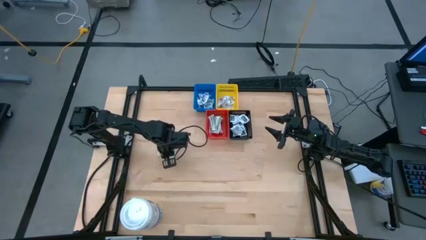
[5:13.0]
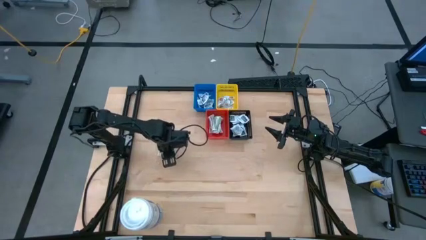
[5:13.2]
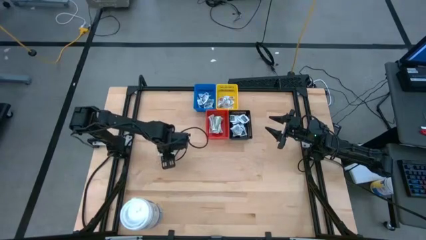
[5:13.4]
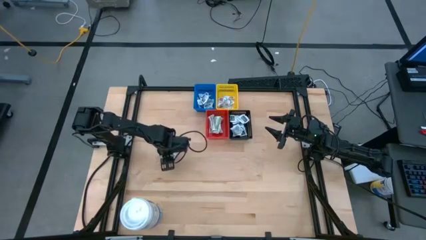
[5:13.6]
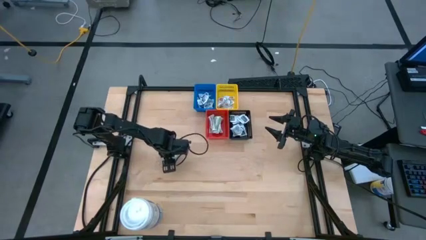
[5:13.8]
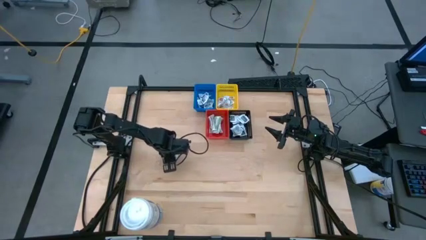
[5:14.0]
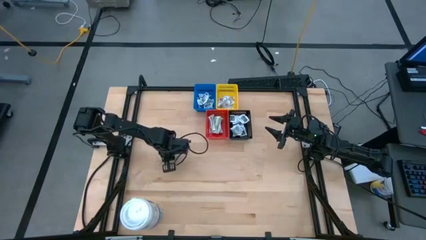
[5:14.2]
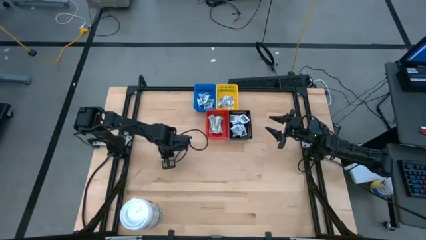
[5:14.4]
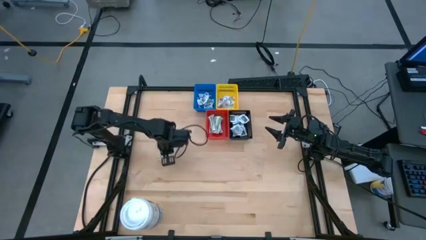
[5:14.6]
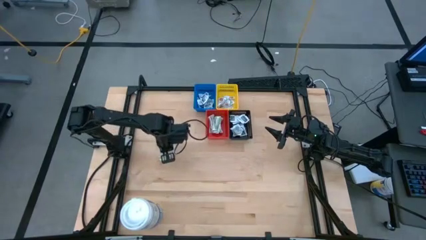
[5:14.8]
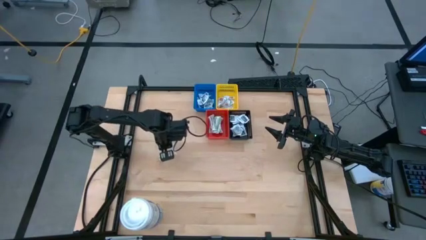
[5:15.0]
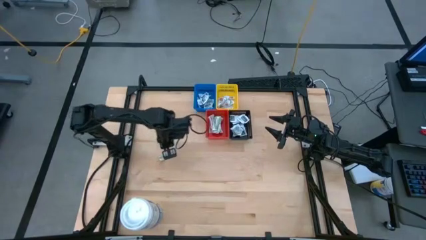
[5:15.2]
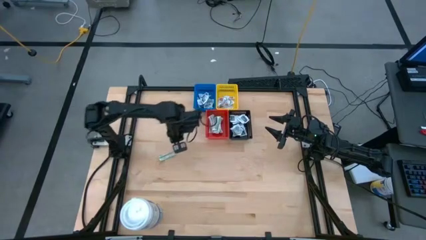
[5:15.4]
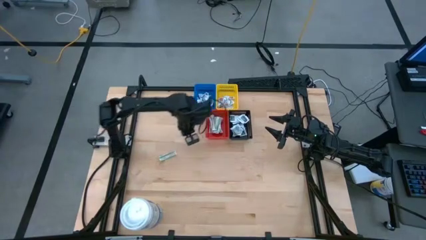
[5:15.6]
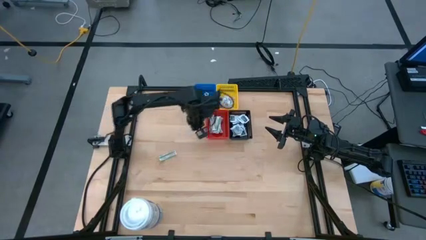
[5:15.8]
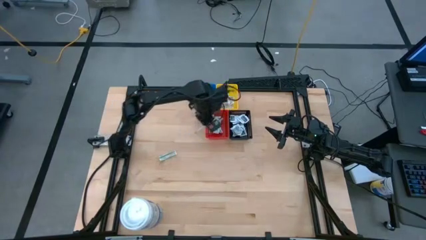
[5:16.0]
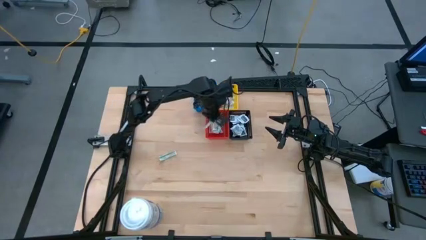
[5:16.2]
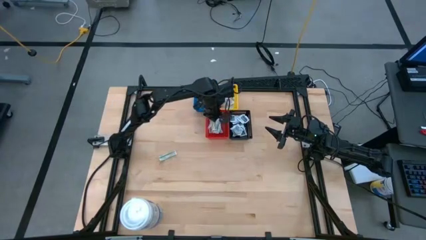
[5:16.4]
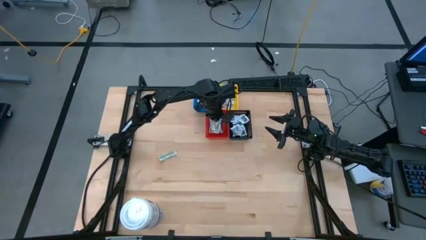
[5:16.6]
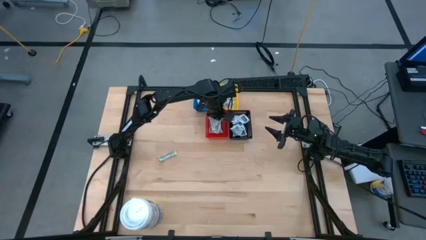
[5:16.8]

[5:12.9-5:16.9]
Task: Pick & Place First Aid Supplies
Put the top bandage pack into the red bin

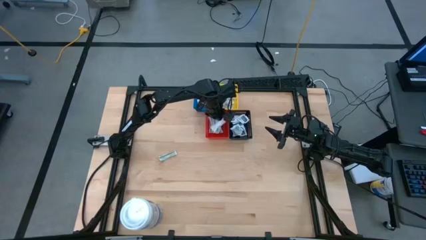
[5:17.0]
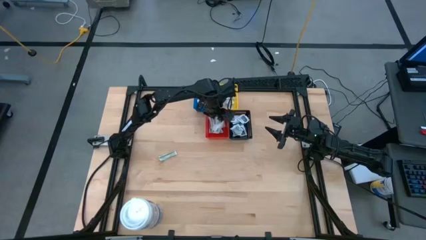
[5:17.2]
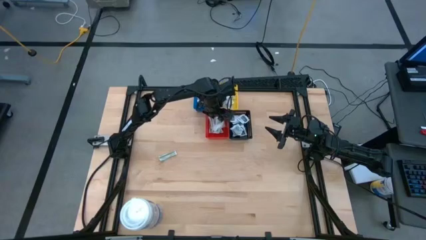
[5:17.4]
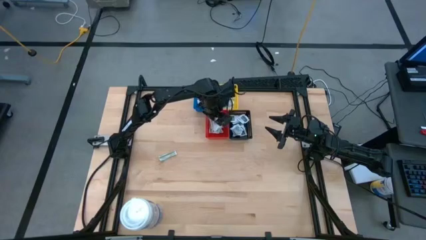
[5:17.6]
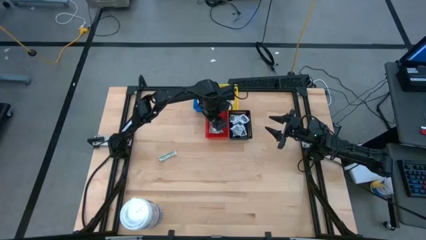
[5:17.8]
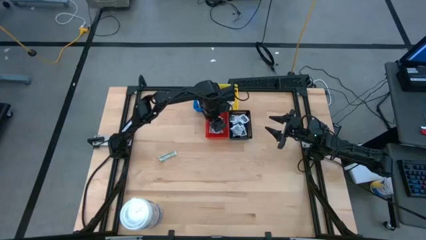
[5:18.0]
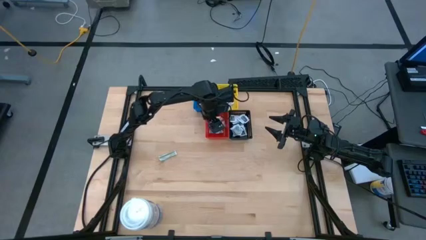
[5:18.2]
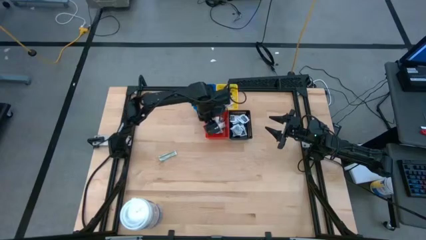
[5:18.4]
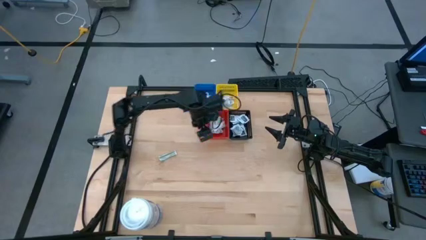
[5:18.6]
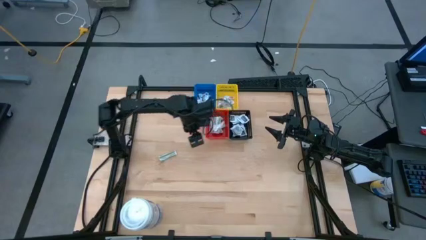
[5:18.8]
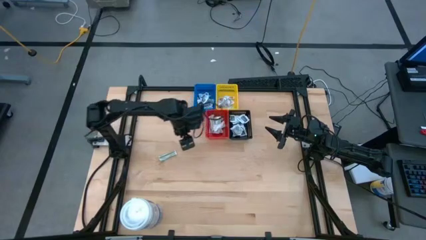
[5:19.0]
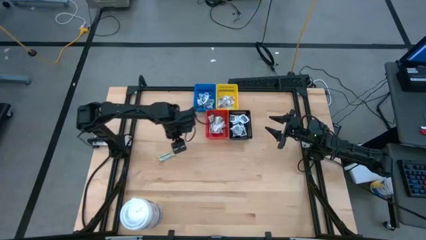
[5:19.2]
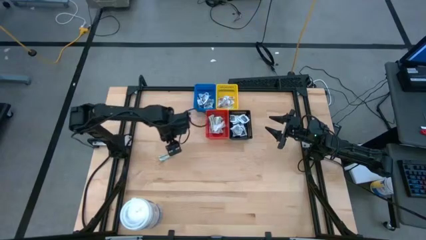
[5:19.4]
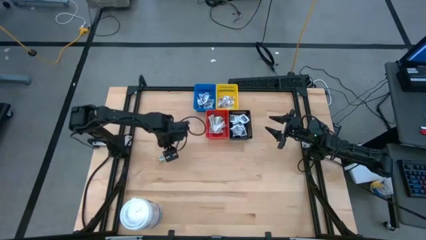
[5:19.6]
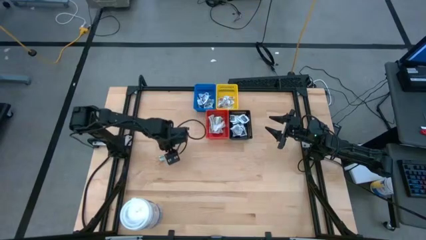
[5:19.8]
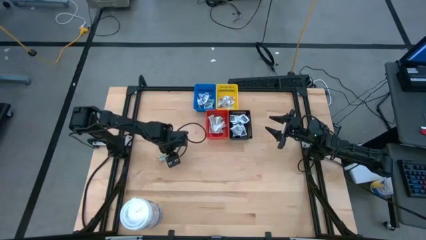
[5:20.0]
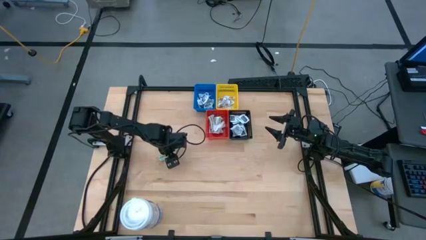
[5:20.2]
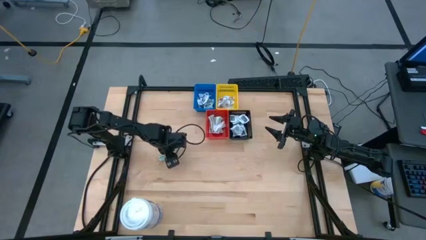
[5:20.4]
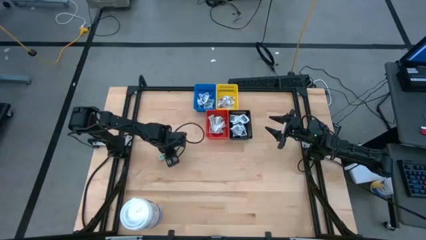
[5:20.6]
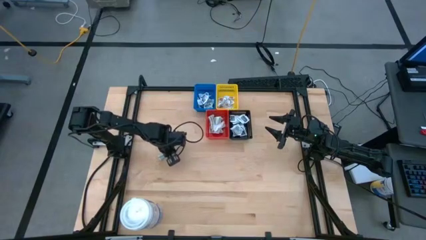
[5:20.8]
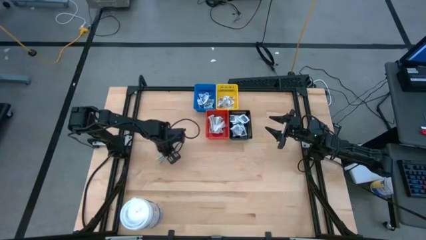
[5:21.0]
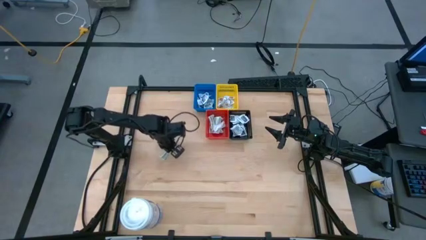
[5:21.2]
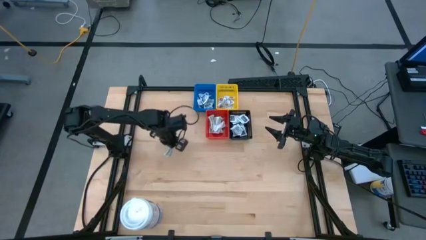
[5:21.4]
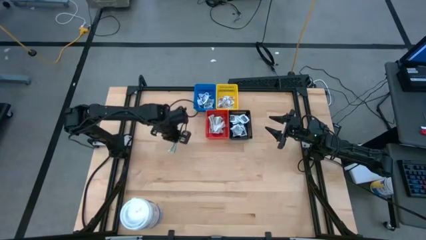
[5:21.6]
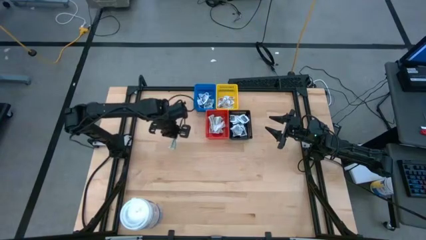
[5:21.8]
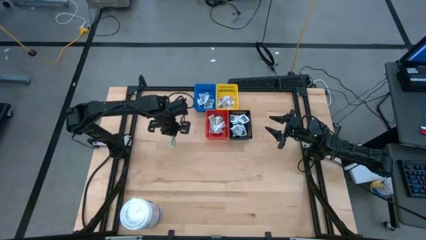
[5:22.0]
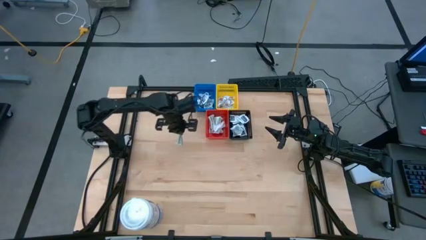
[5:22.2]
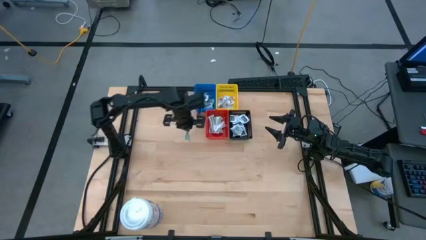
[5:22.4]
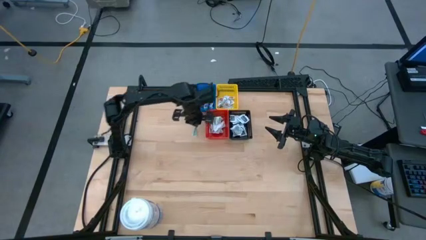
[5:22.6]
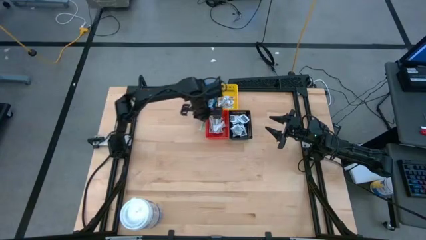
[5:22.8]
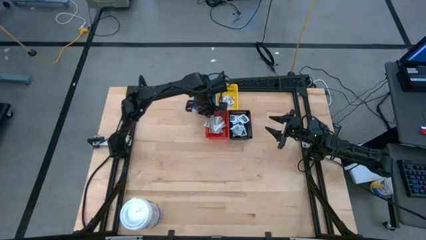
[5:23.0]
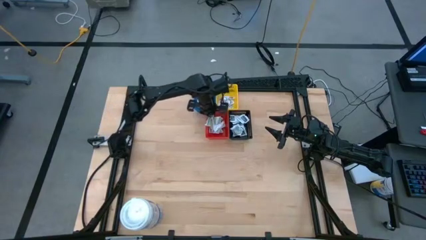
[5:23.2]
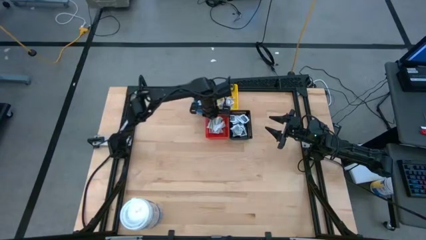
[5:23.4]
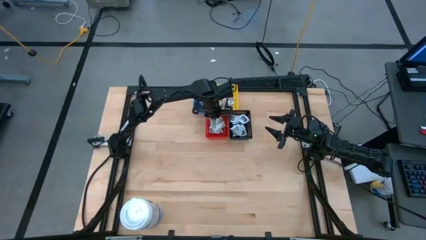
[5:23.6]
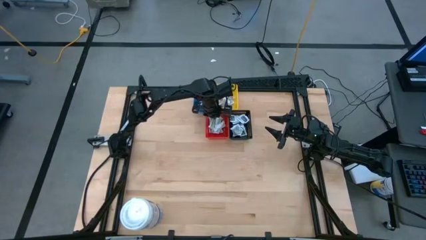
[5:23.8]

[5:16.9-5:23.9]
Put the bandage pack into the red bin

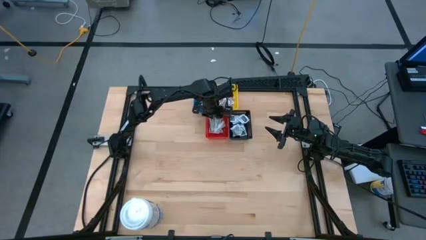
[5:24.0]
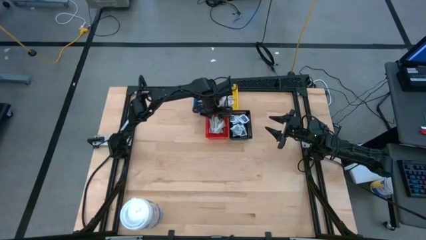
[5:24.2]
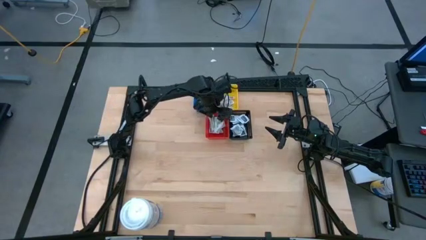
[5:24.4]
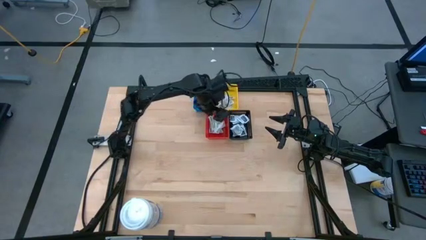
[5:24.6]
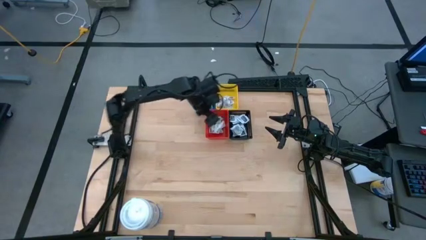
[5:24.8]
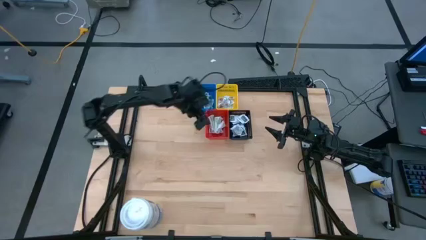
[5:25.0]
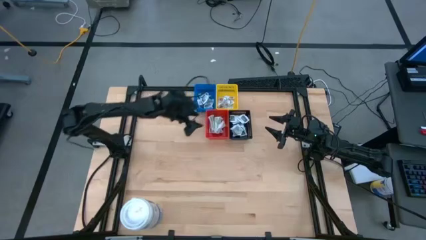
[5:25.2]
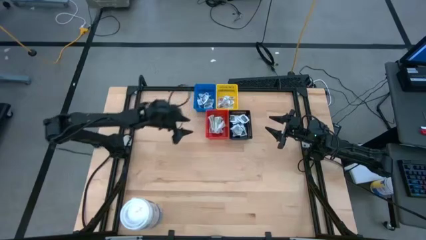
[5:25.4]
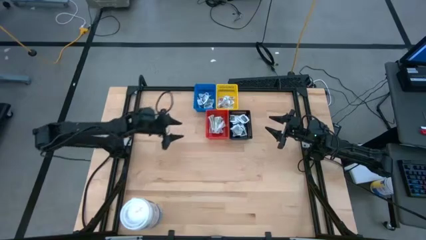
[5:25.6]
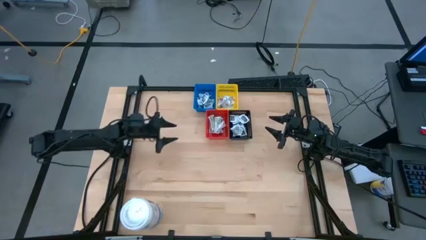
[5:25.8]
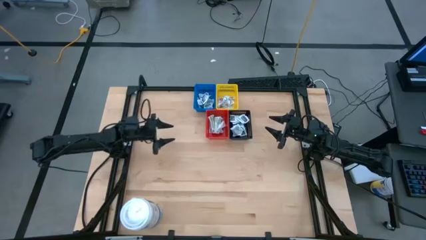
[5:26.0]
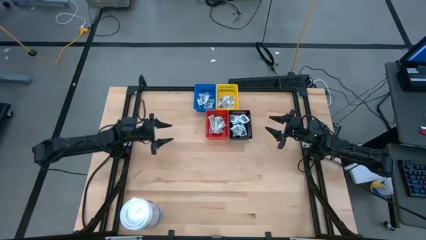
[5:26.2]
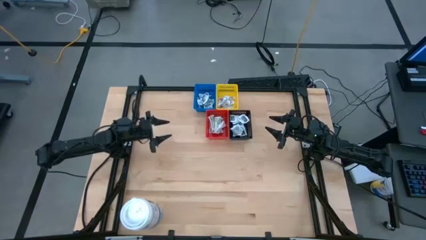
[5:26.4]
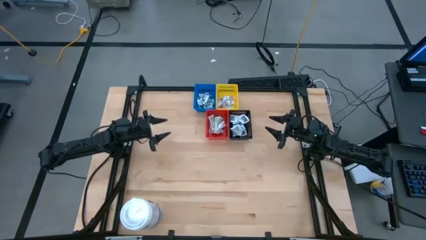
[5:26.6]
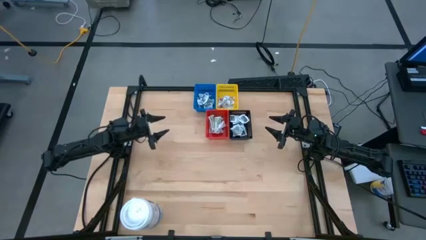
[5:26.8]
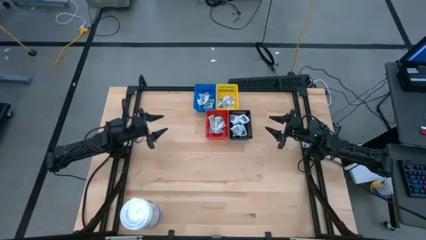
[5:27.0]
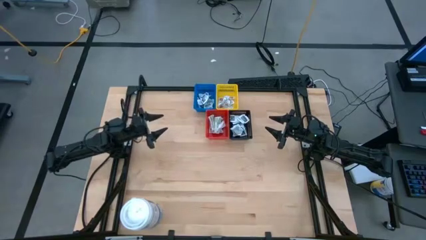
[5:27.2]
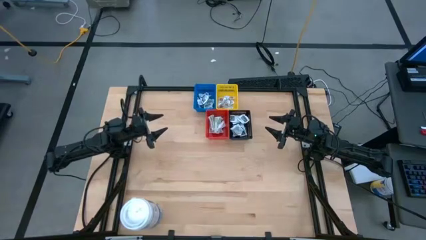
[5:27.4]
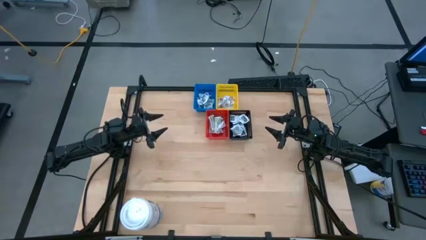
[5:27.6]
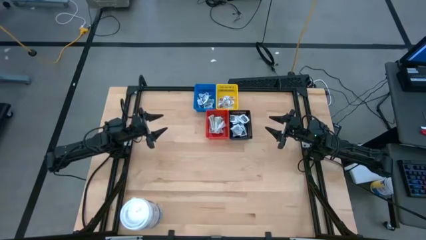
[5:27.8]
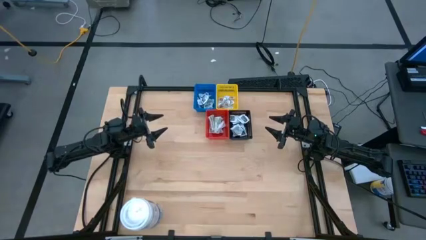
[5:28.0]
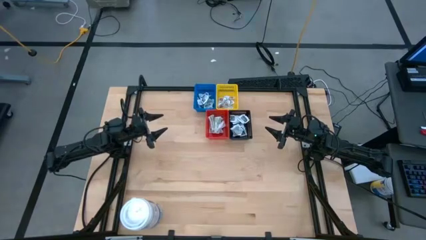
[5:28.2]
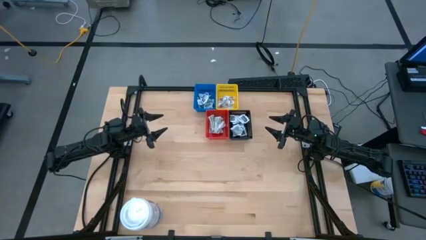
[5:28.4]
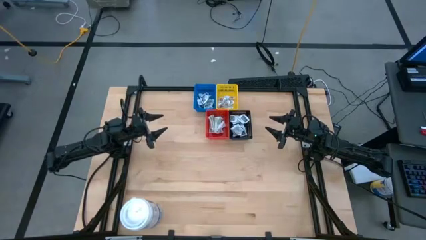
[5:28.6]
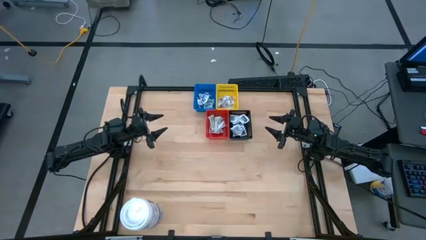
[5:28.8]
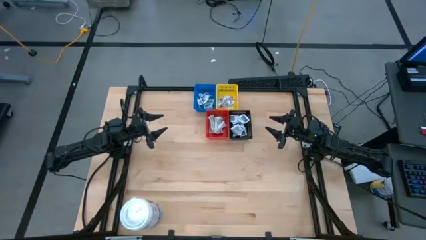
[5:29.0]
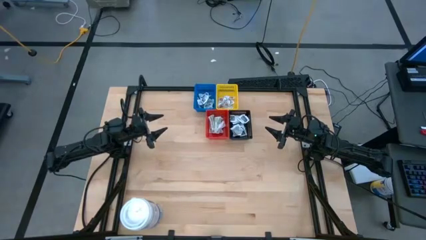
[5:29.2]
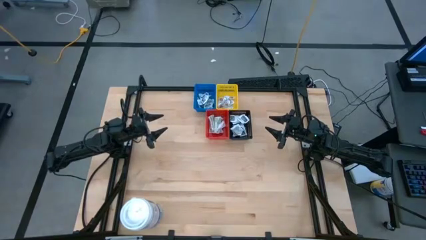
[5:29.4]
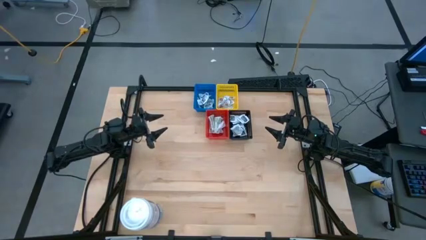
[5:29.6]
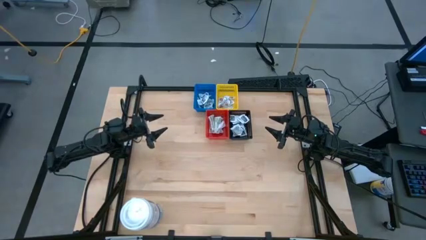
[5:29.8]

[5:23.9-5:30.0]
Return to Home Position
